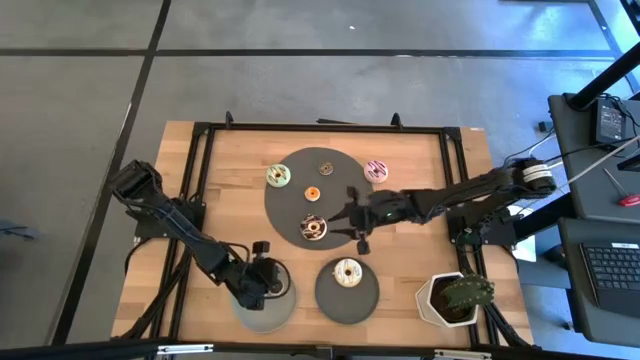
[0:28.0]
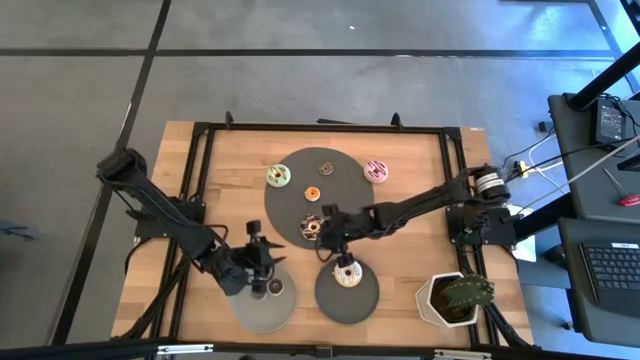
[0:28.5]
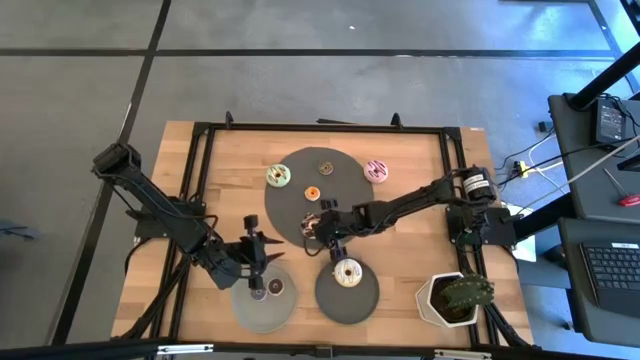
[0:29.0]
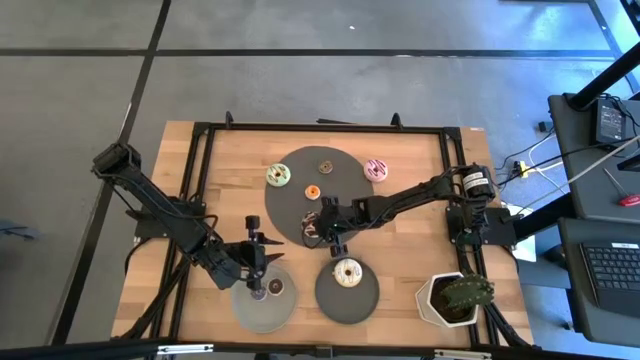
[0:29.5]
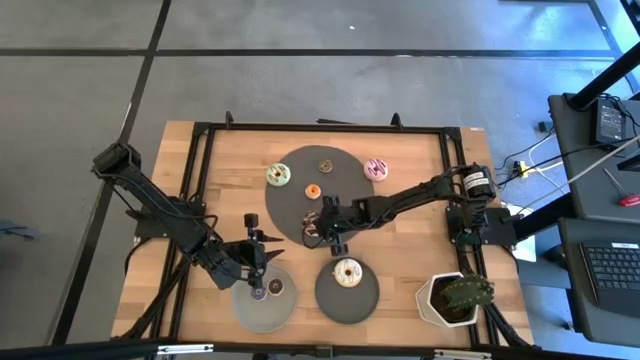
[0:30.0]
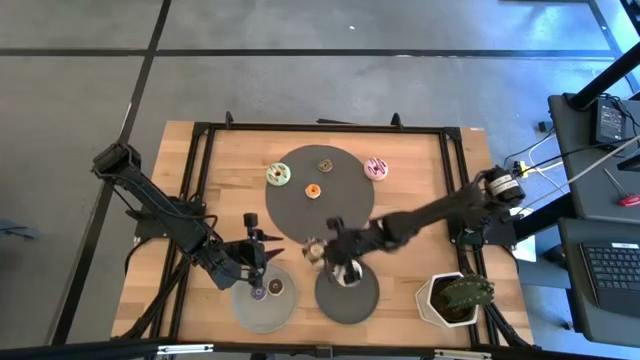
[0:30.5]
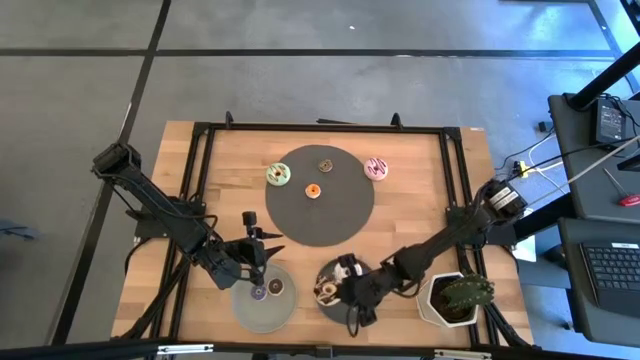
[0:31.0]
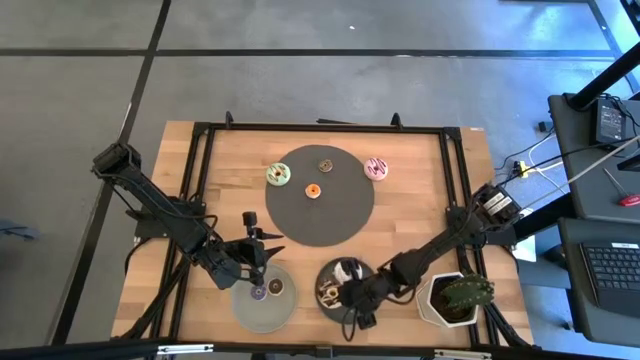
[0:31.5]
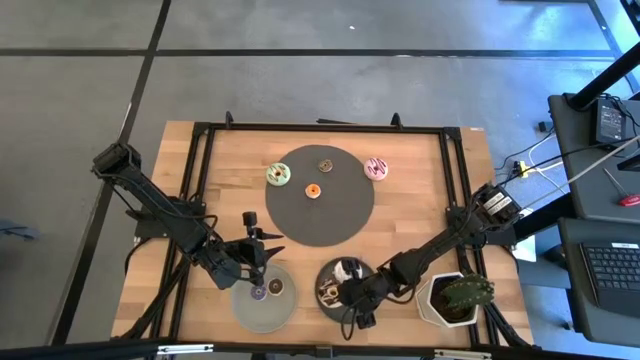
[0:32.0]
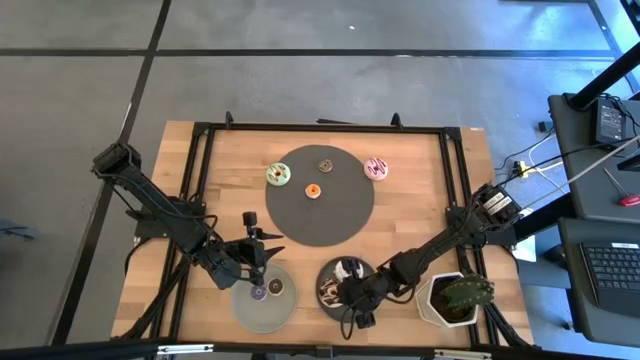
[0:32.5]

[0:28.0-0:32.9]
Task: Pick & Place donuts
Put the big black and white donut on the dark gray plate

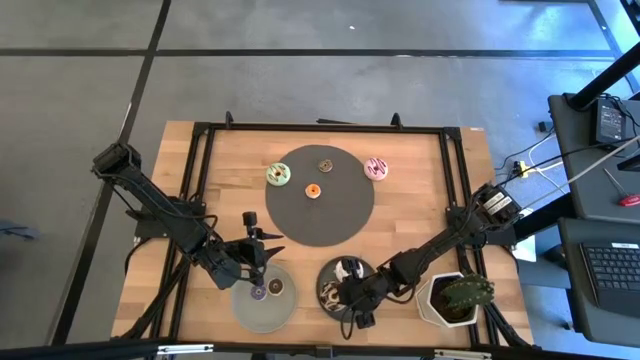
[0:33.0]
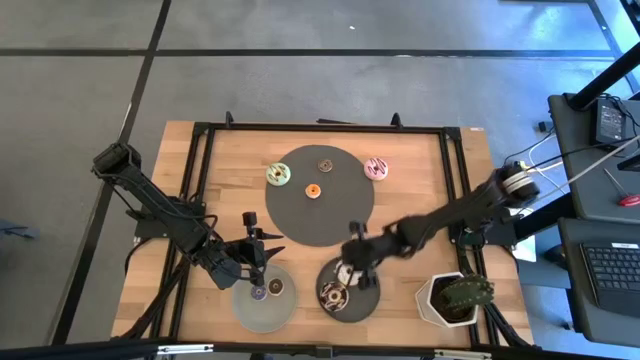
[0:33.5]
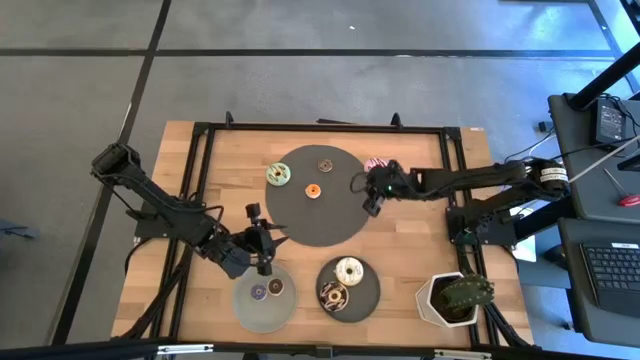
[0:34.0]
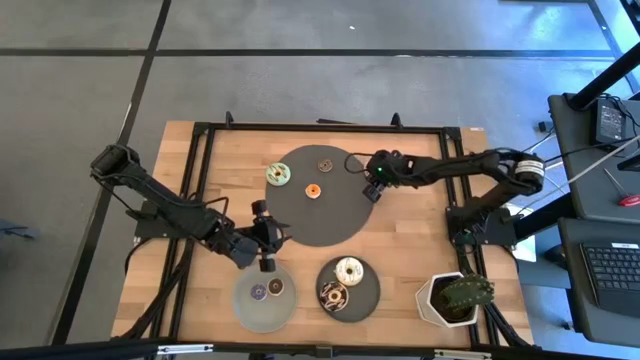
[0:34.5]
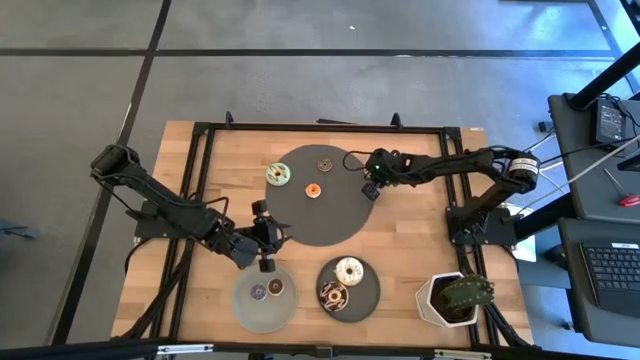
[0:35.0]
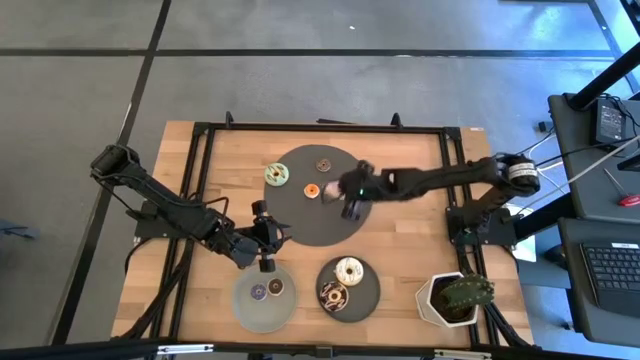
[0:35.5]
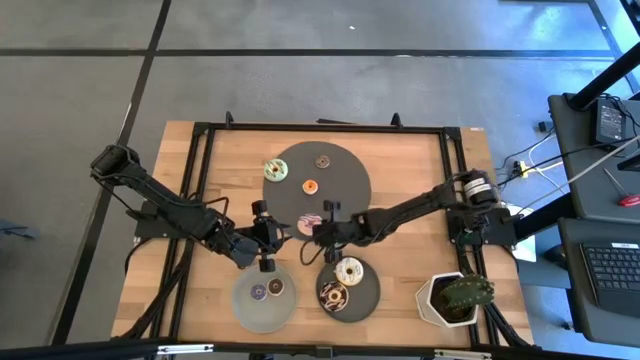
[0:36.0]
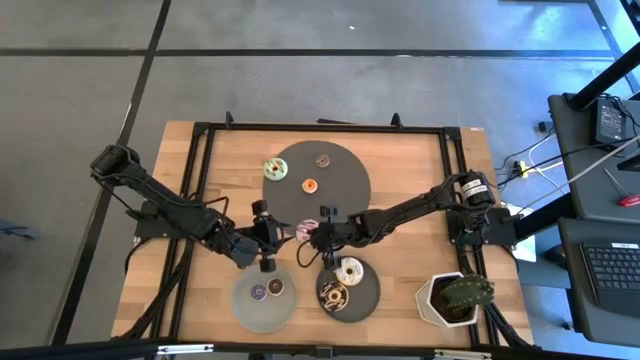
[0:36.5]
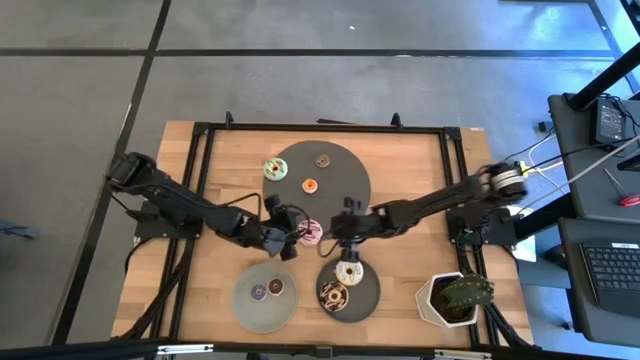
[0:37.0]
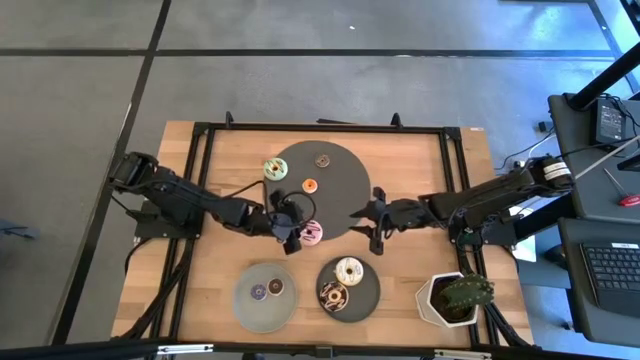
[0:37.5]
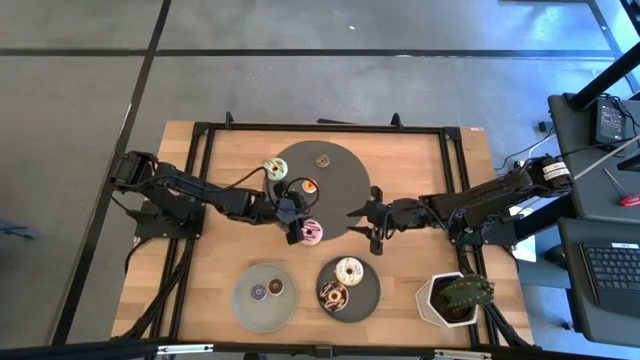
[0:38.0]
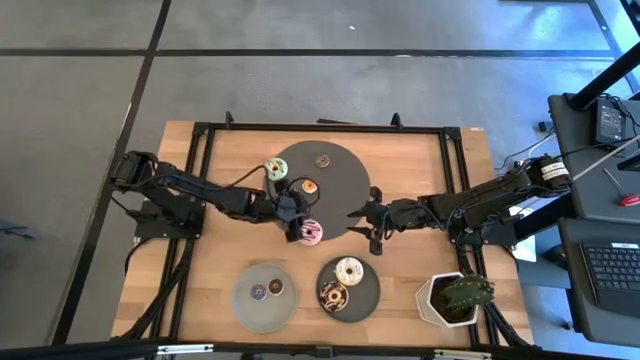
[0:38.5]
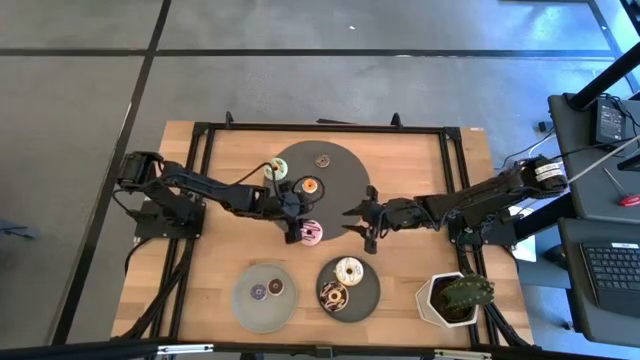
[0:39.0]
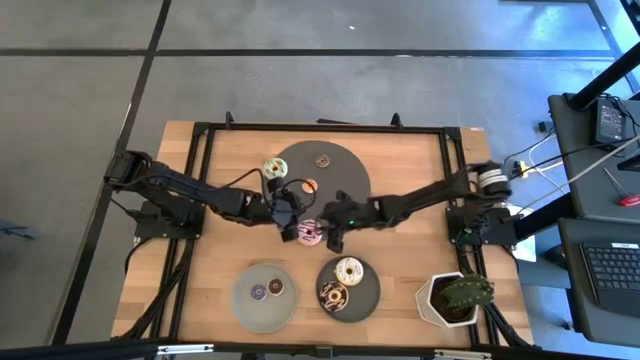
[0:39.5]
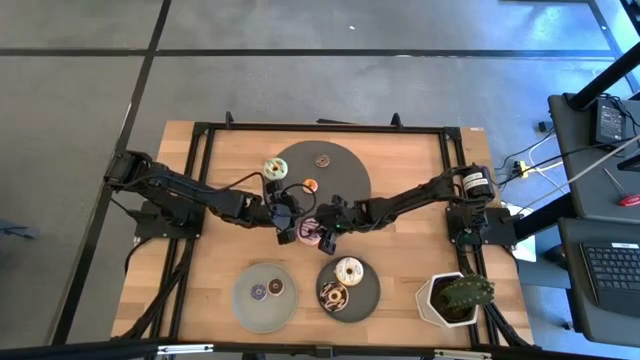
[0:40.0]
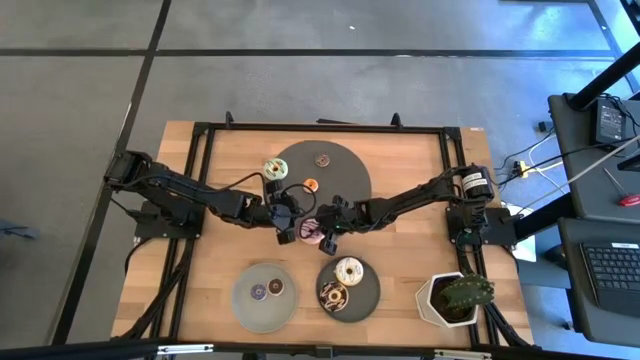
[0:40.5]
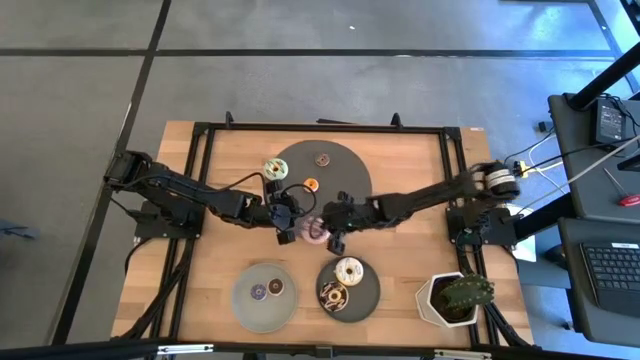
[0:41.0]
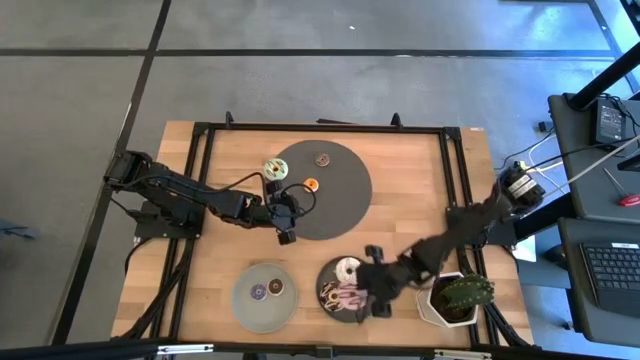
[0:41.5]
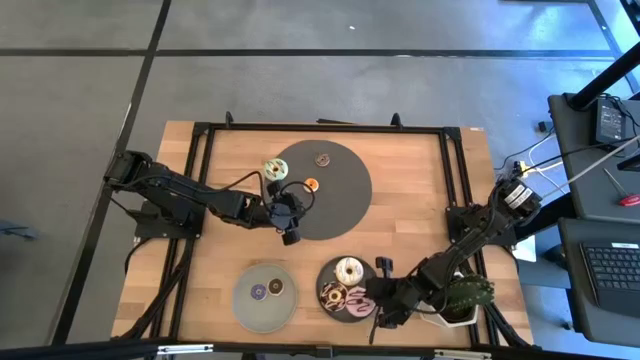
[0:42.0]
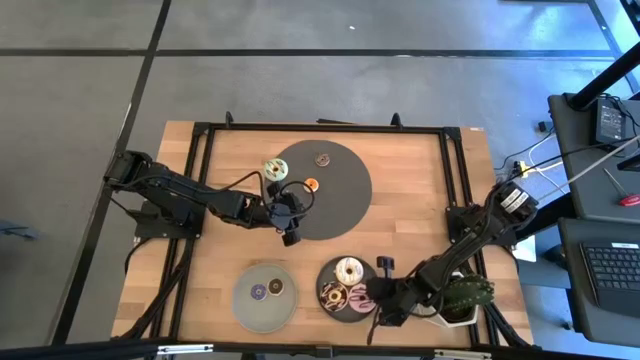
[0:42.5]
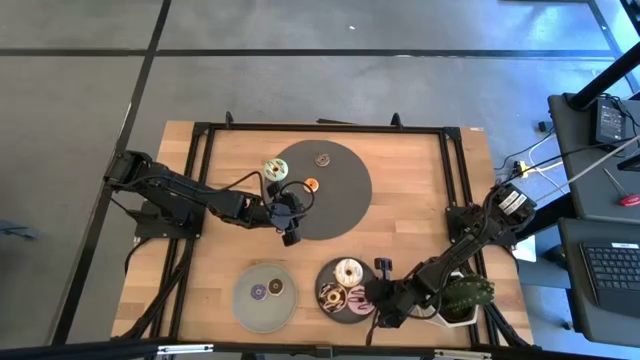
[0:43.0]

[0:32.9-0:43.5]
Put the big purple donut on the dark gray plate

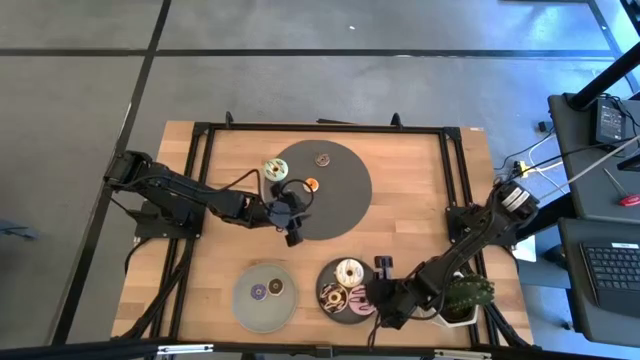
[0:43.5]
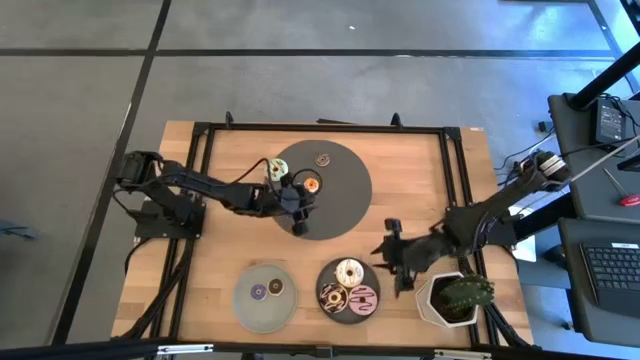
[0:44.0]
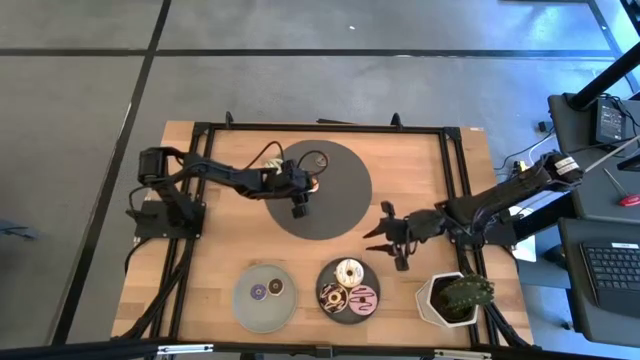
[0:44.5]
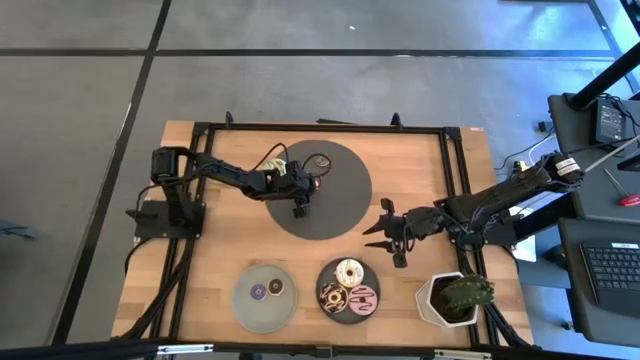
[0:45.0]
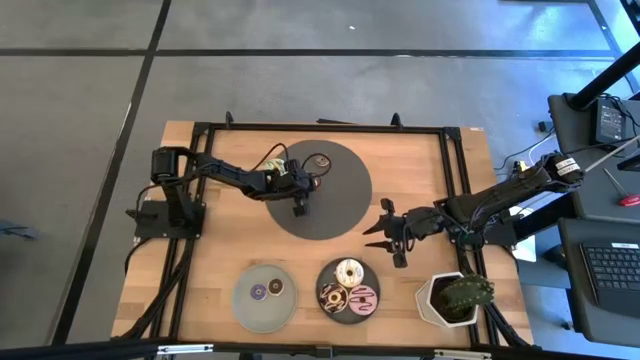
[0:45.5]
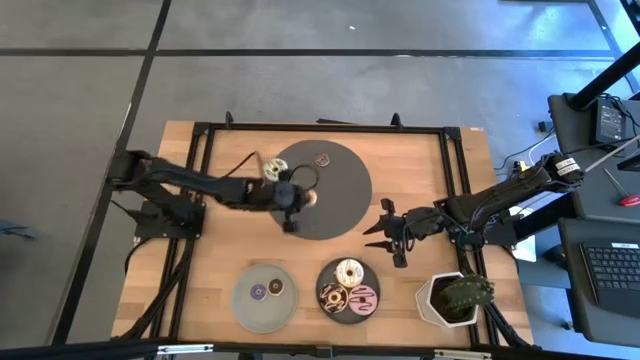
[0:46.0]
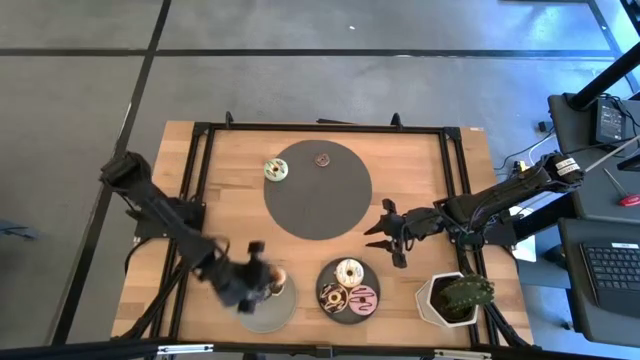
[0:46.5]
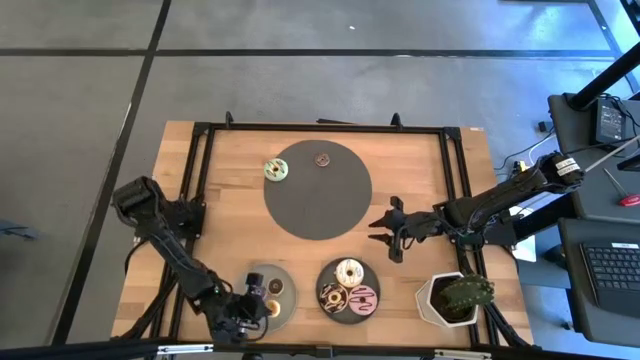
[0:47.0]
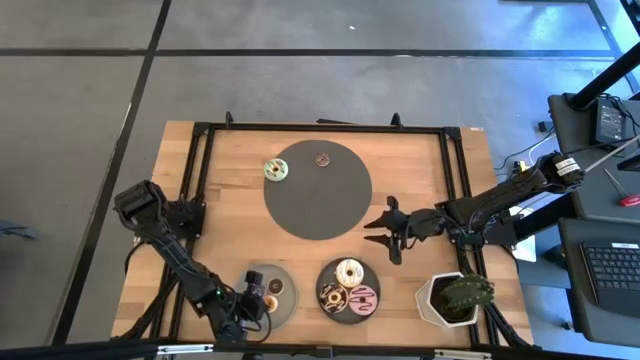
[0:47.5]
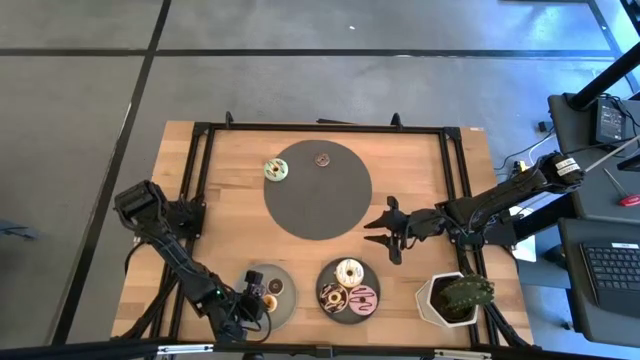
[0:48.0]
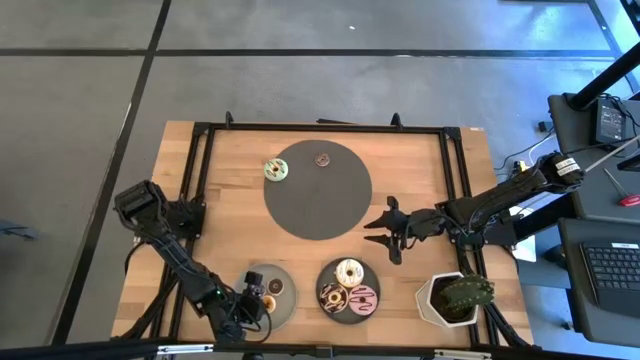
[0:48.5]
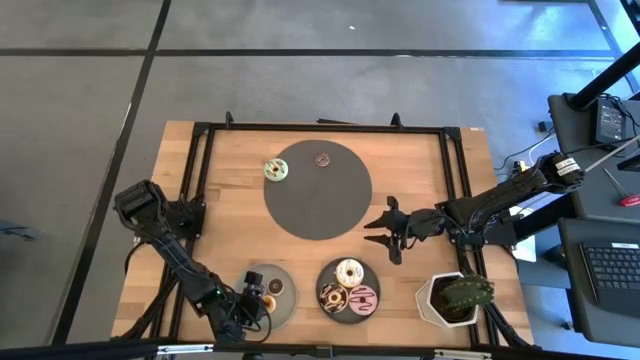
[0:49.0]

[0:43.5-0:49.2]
Put the small yellow donut on the gray plate
